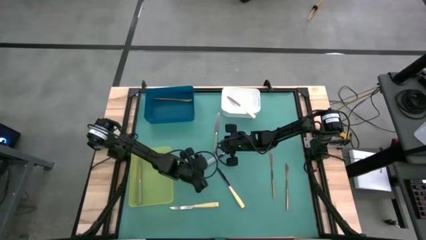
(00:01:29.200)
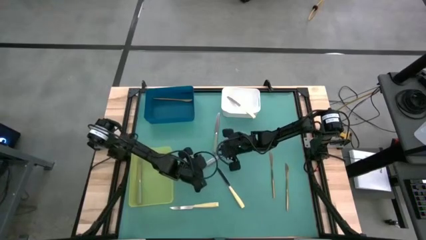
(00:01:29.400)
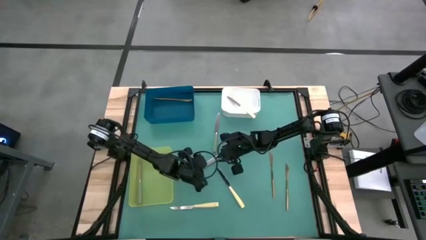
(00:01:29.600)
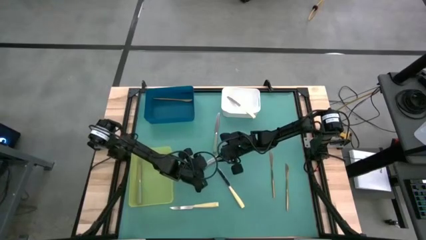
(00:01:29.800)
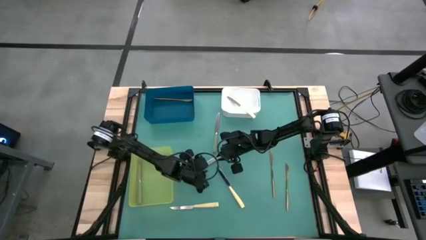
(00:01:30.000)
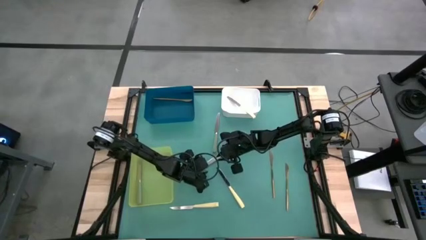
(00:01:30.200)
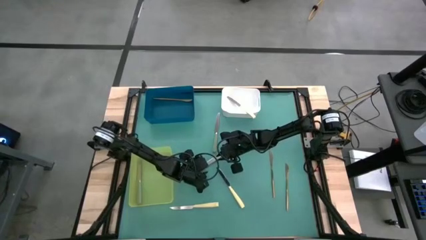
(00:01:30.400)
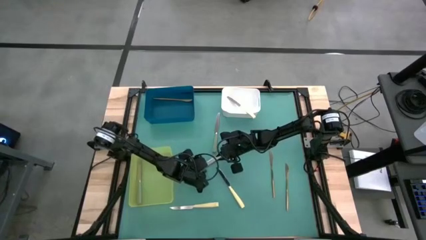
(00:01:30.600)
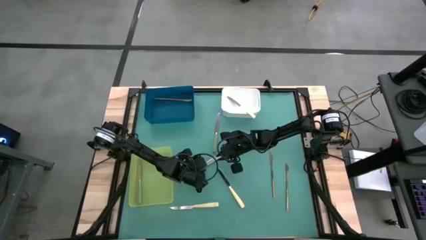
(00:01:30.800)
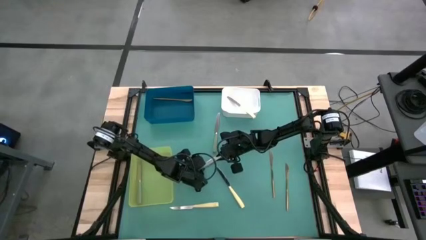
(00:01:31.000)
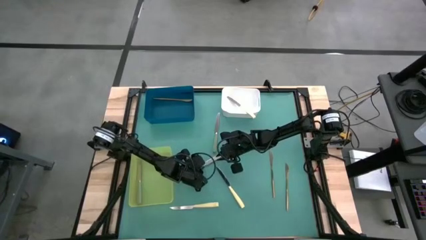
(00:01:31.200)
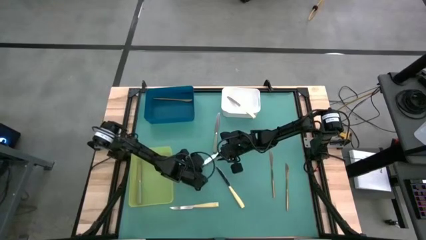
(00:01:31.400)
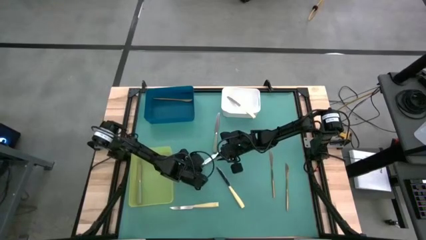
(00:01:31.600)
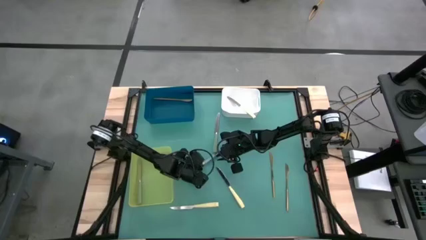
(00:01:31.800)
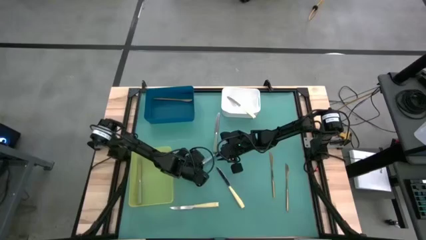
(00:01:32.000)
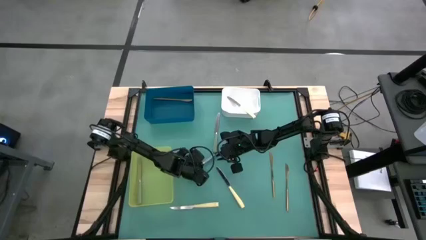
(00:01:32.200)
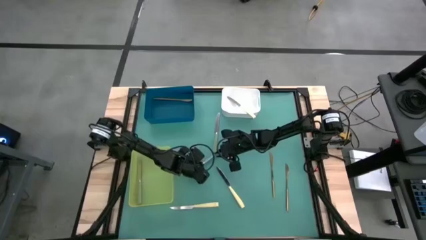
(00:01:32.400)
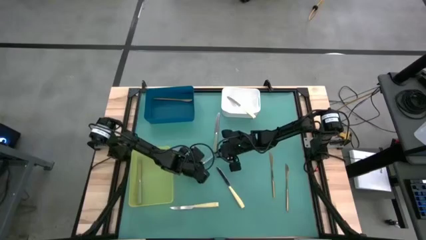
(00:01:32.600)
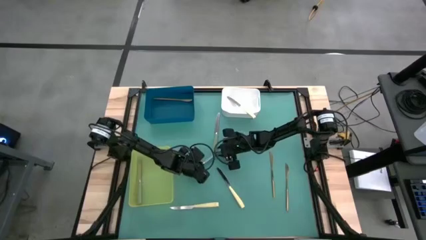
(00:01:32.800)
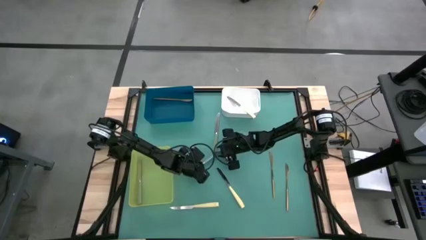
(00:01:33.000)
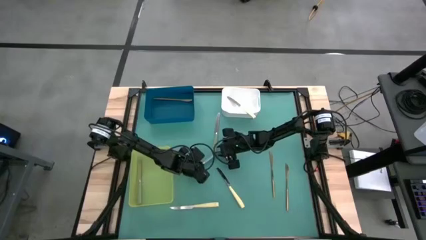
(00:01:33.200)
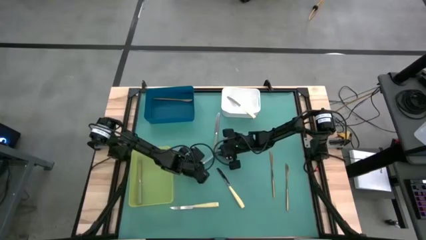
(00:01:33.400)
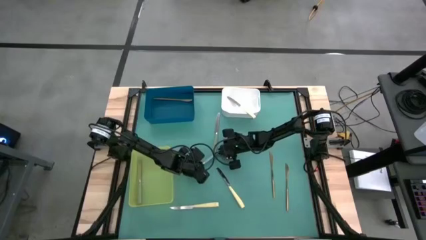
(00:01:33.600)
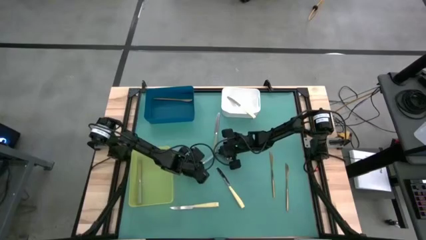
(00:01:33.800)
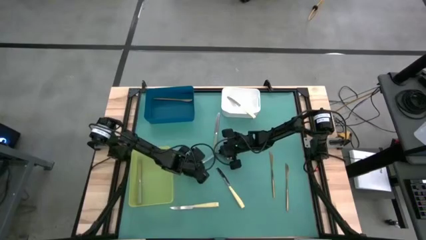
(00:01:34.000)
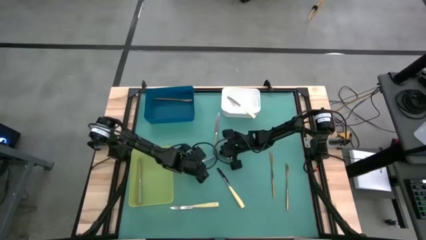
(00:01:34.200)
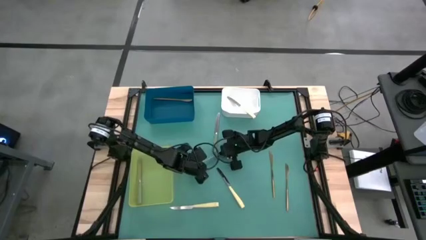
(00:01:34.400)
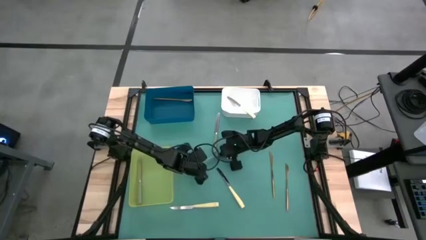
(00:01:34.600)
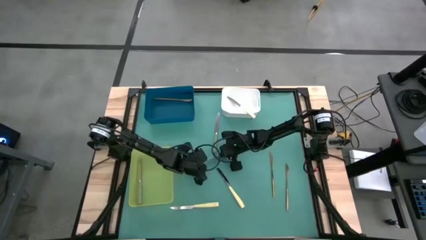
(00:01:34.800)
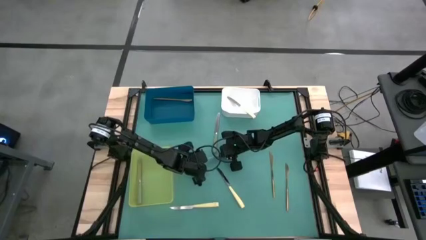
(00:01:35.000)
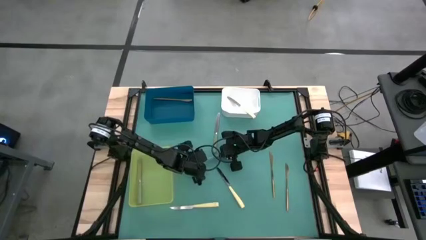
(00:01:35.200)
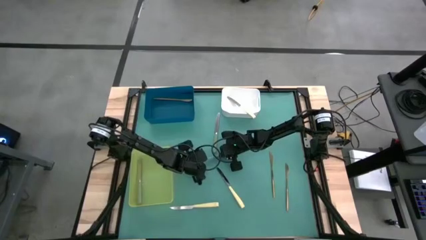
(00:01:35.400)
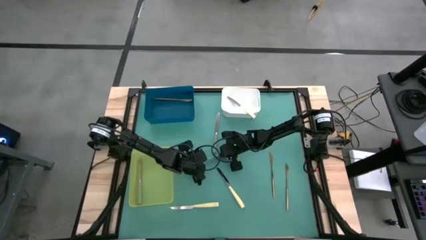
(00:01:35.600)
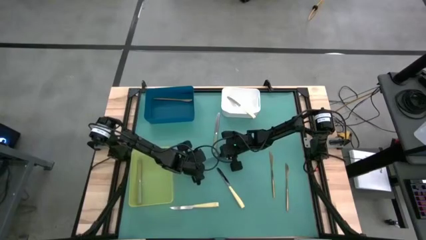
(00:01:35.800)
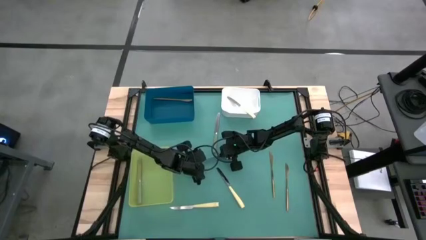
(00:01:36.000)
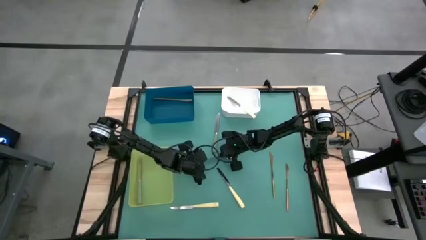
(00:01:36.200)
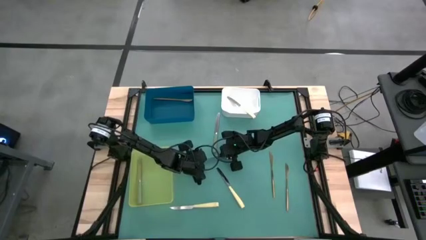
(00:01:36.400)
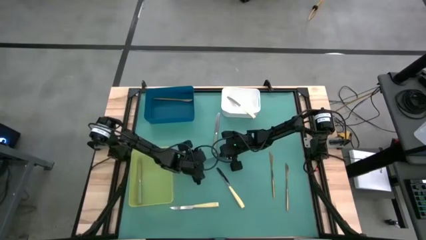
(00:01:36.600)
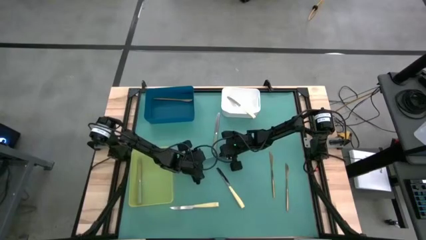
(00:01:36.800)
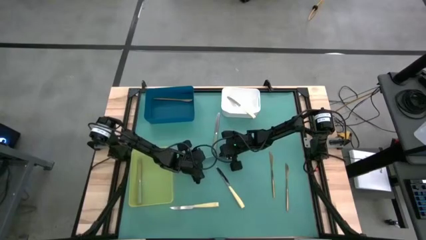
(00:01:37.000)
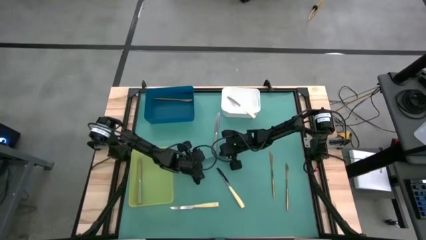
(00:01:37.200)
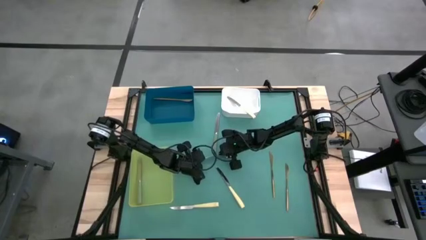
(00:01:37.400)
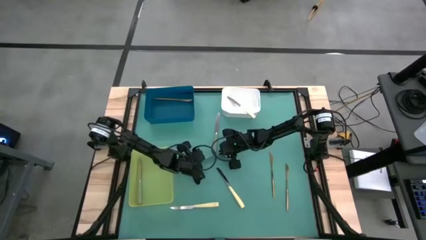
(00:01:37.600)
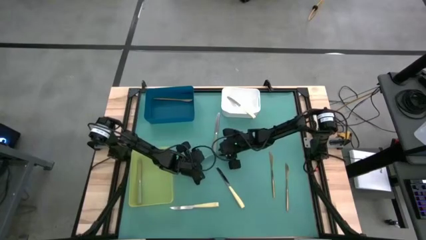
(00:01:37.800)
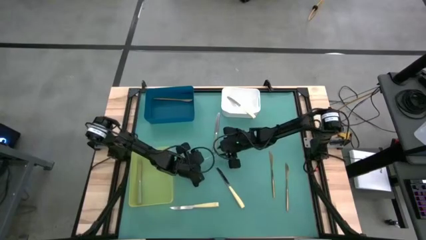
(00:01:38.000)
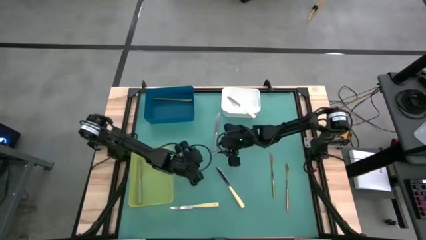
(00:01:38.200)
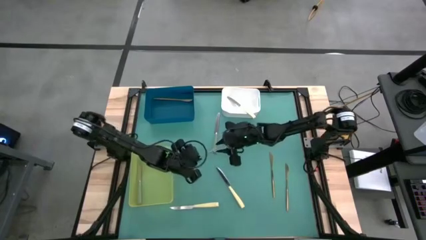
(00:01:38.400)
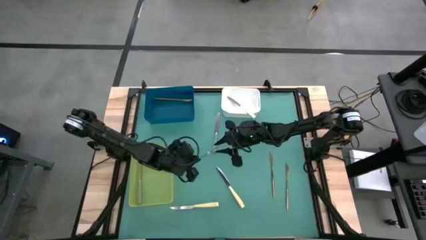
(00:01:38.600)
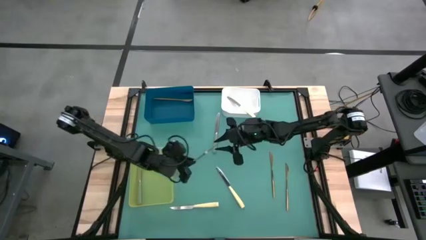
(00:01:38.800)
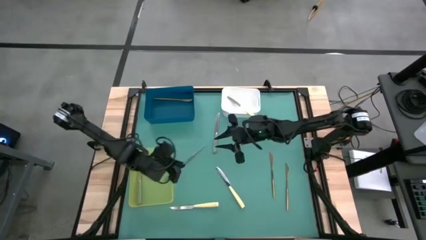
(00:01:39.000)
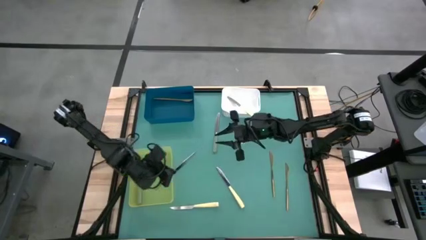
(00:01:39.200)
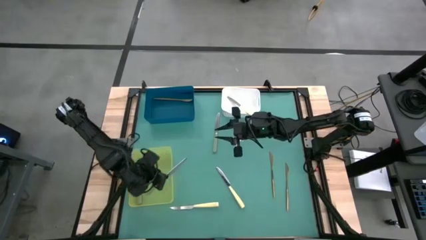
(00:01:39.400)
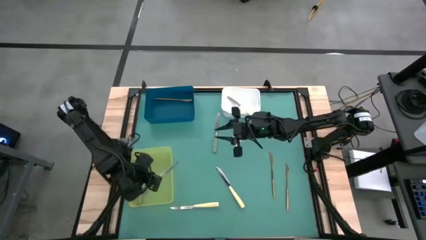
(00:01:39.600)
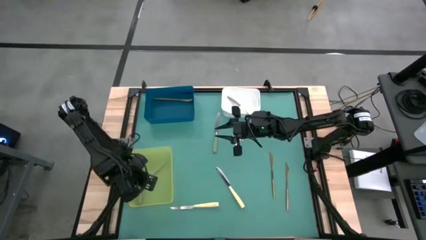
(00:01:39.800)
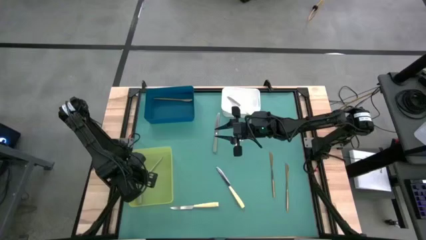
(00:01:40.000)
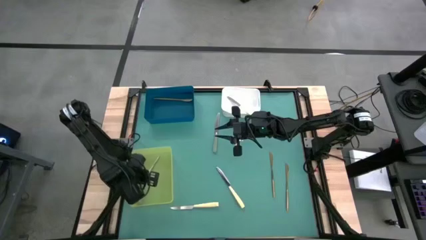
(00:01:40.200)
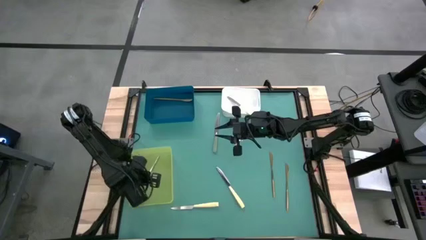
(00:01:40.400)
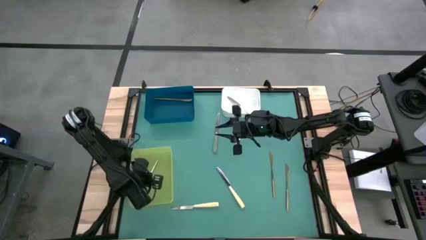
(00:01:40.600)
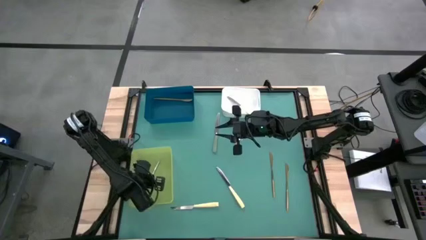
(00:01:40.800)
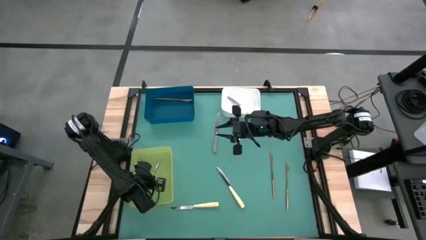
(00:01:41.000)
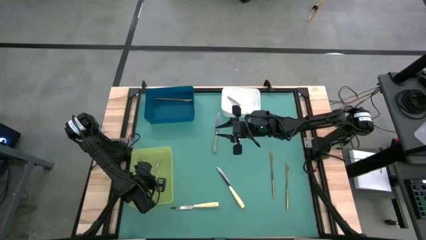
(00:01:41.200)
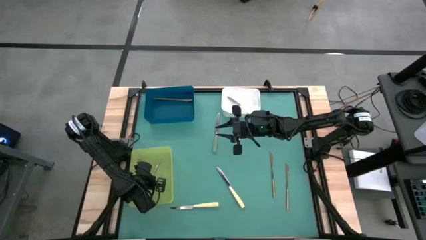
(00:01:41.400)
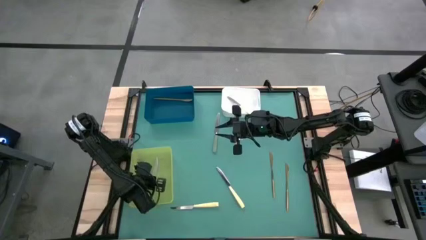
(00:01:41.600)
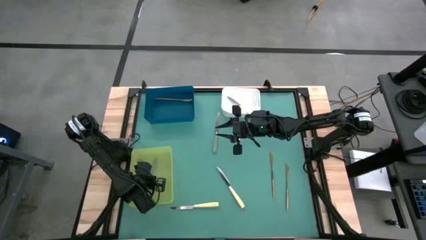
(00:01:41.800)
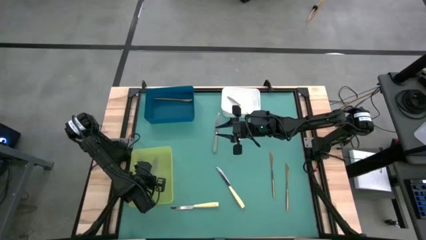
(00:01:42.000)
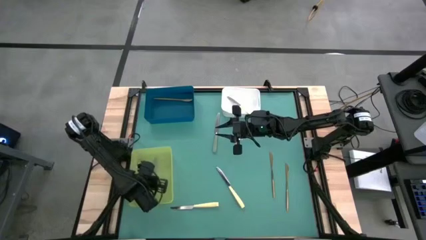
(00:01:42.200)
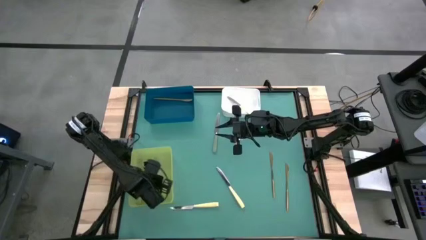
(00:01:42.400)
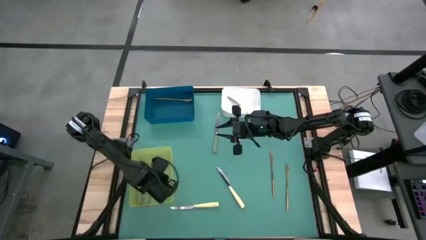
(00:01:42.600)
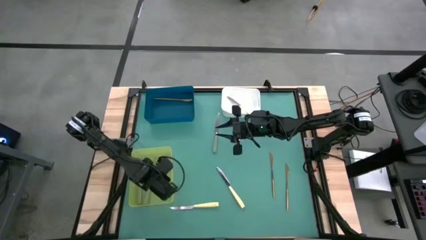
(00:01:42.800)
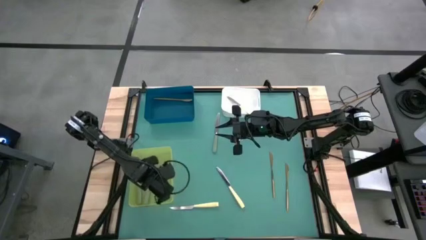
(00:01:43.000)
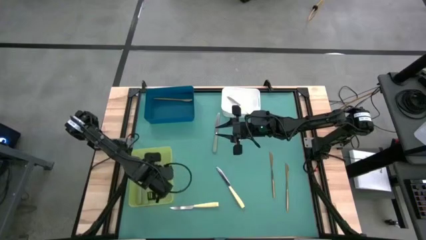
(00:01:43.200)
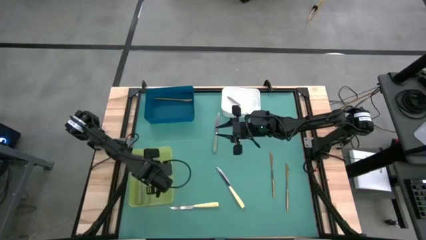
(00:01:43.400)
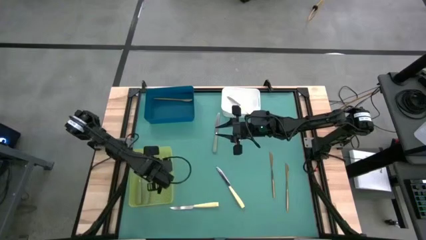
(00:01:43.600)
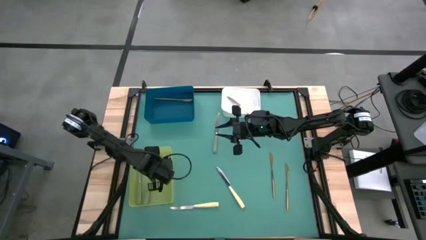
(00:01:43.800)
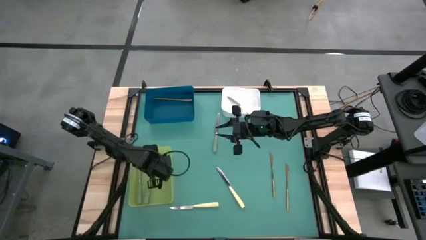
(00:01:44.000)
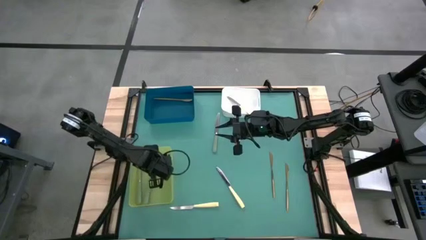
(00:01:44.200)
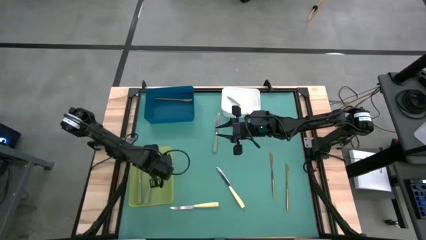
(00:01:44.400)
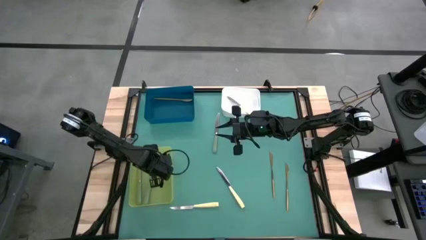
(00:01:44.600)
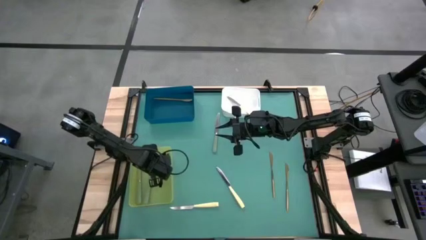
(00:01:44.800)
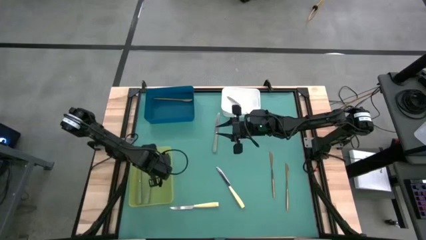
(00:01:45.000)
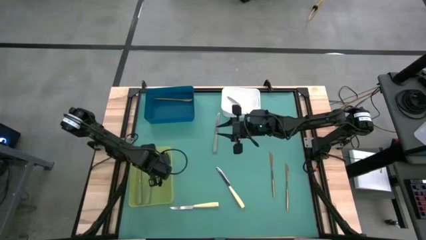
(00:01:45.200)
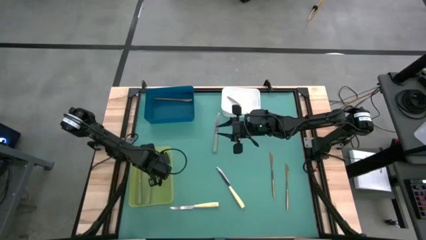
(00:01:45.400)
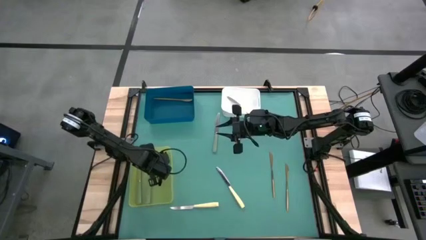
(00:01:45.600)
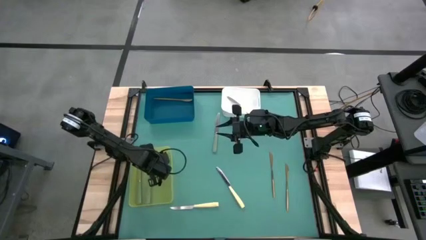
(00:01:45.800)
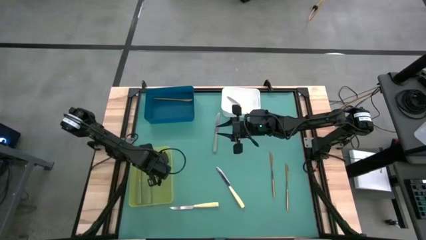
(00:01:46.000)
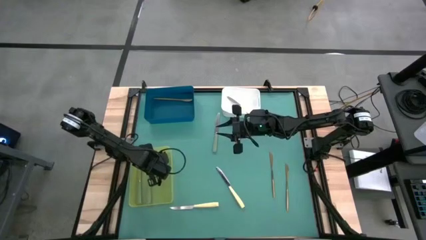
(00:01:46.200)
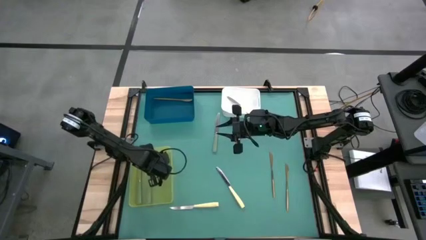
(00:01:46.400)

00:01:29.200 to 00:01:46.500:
Task: Sort silverware by color (type)
Put the bottom green knife into the green bin
